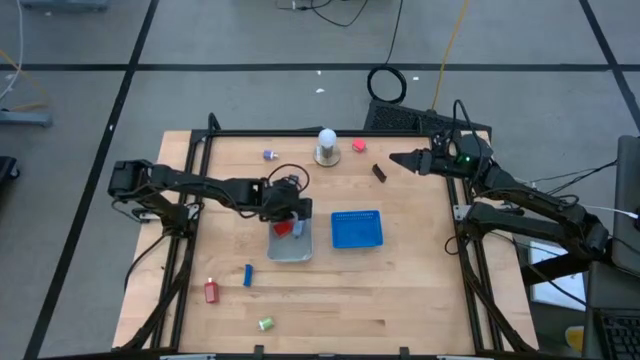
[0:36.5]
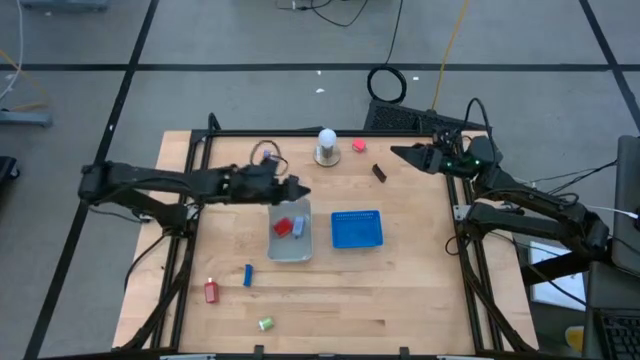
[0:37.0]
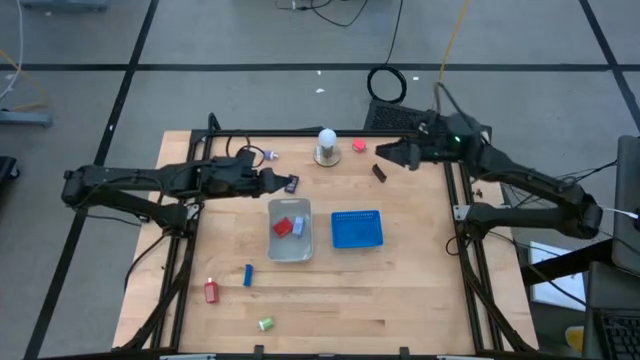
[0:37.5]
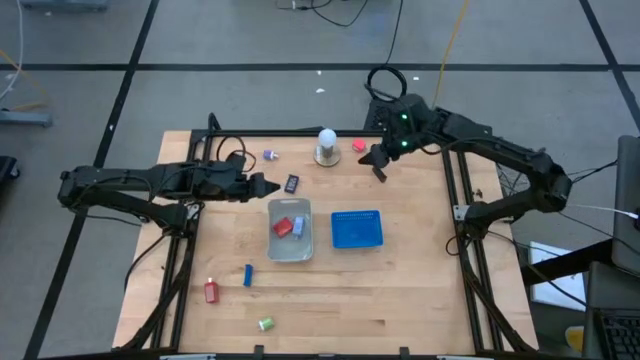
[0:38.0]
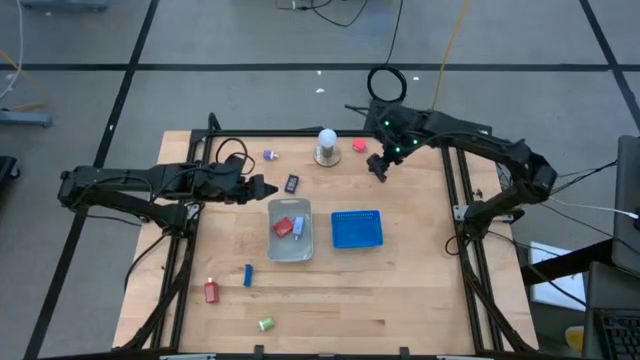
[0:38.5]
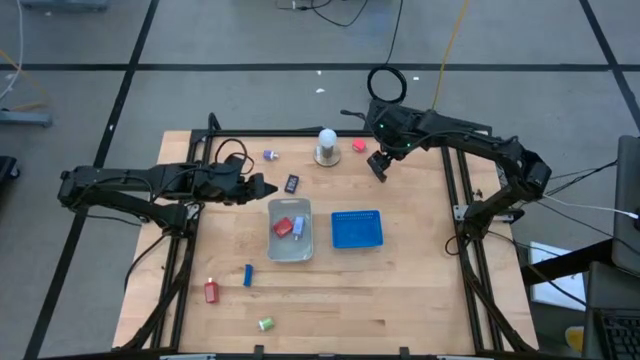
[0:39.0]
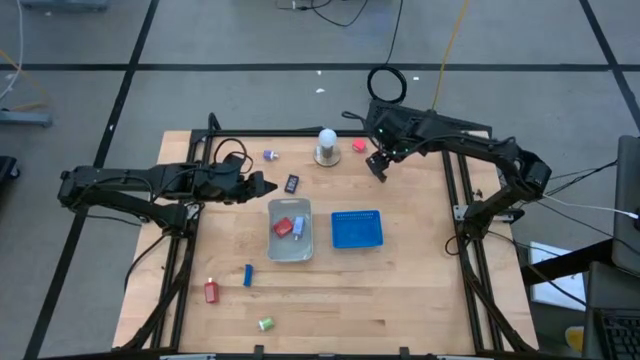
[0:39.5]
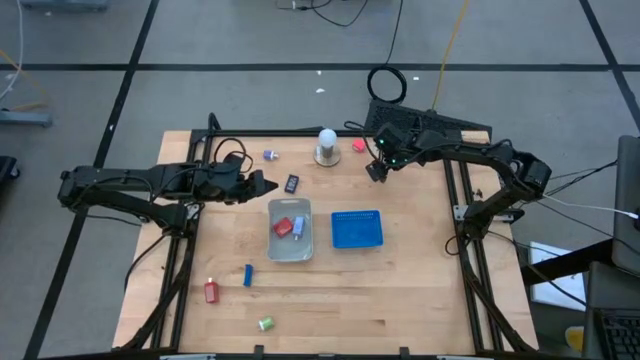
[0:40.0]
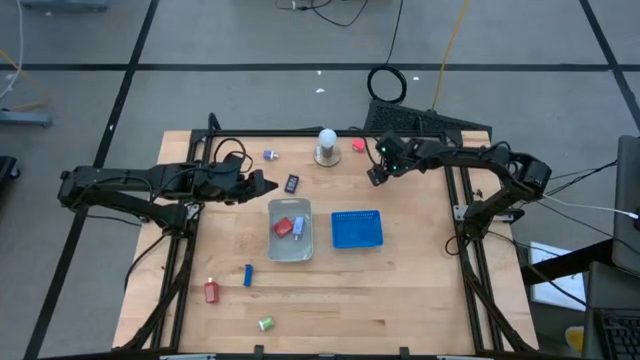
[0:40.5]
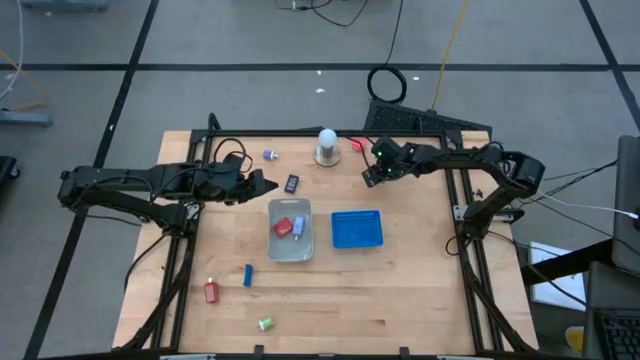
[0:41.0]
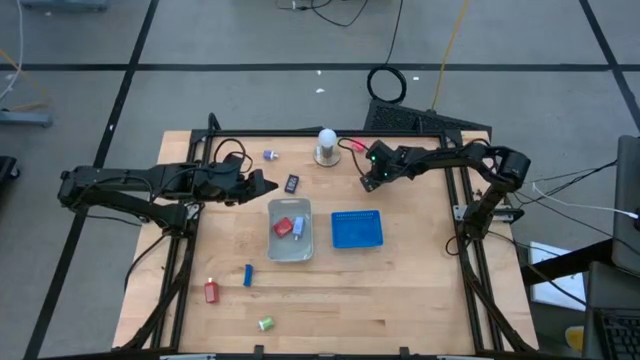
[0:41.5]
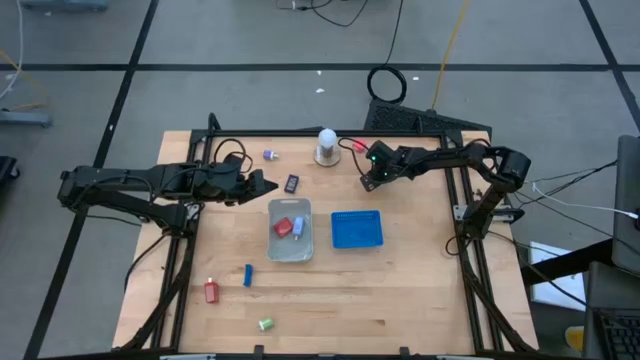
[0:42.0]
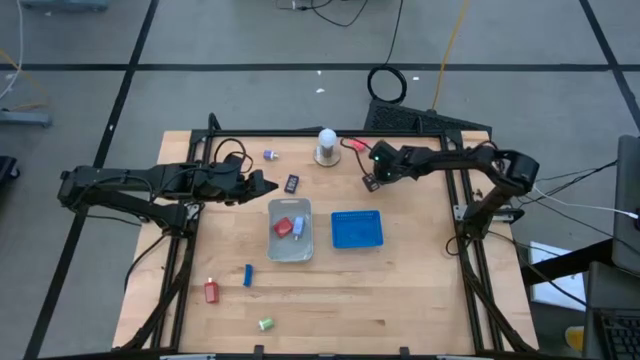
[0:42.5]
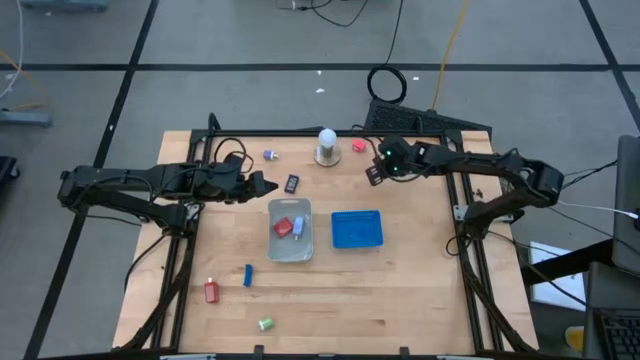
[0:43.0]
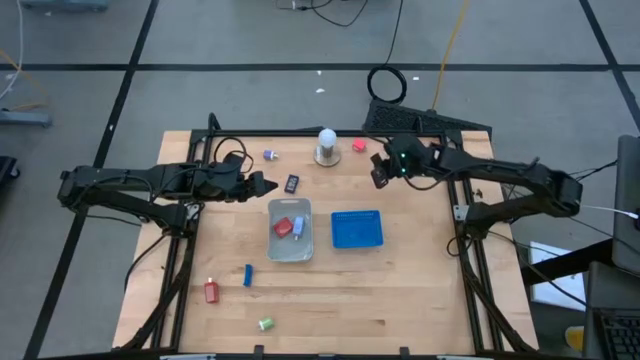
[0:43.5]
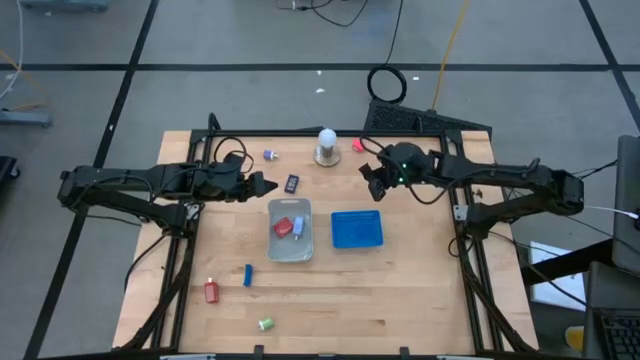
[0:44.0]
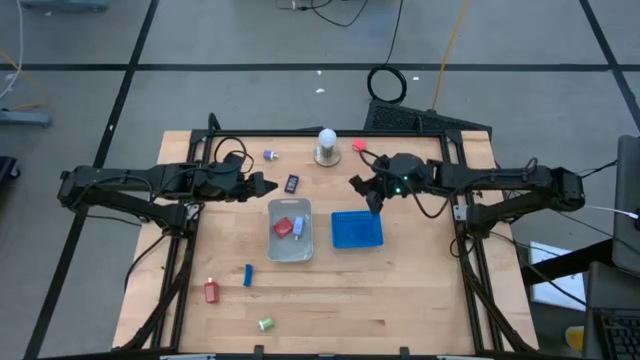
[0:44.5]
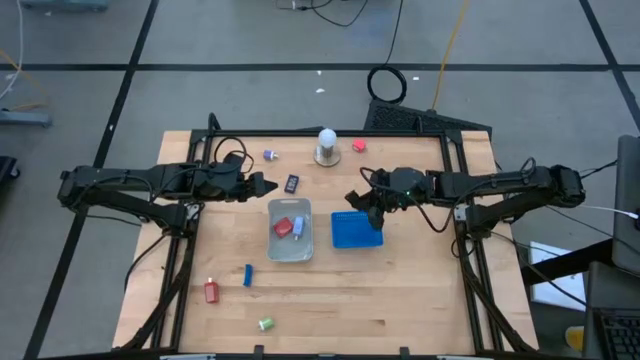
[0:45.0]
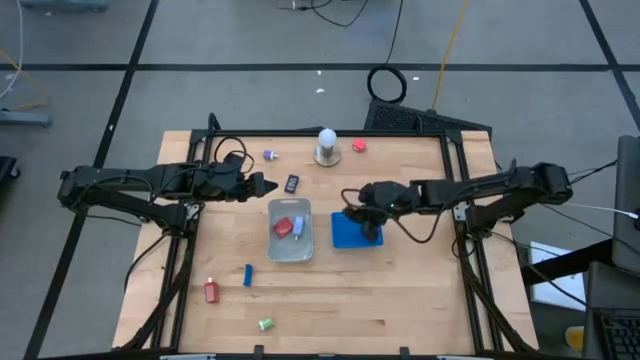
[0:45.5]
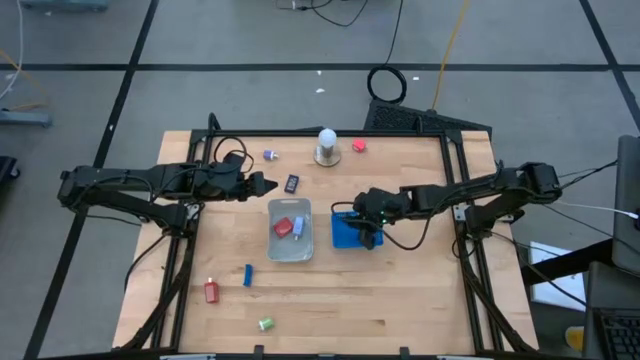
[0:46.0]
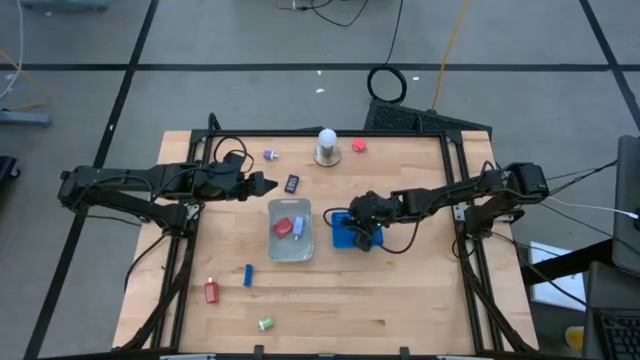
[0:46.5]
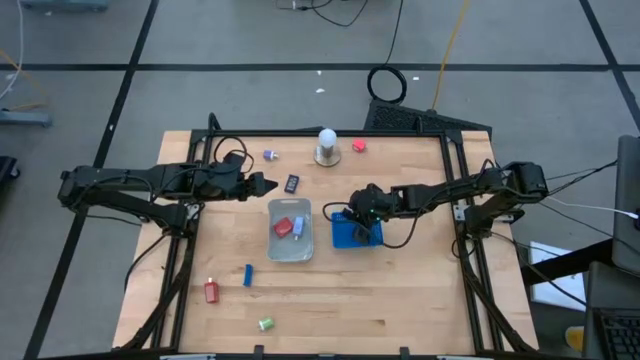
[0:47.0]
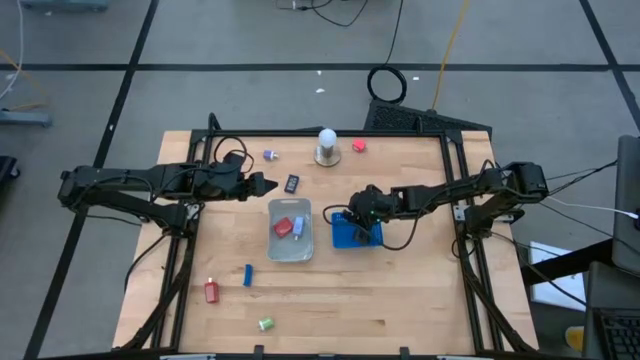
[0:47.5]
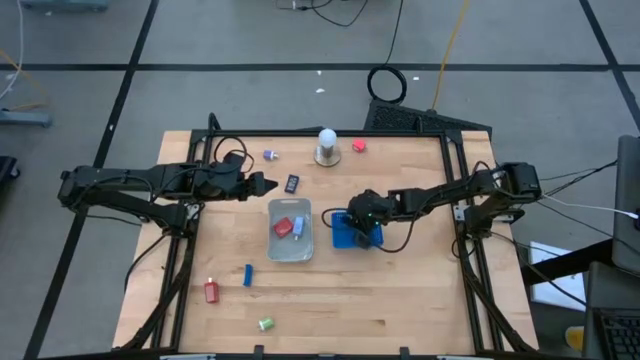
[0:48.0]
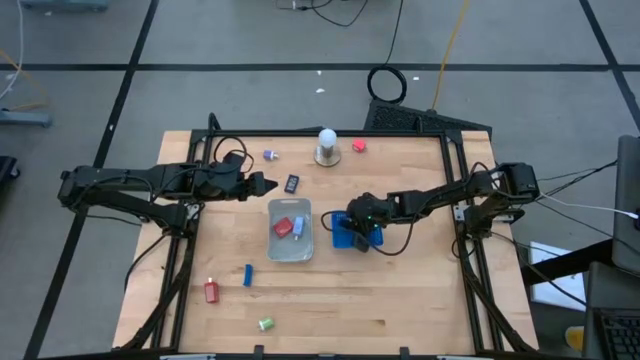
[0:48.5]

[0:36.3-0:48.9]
Task: Pick & Place Office items
Put the black digital clock into the blue bin

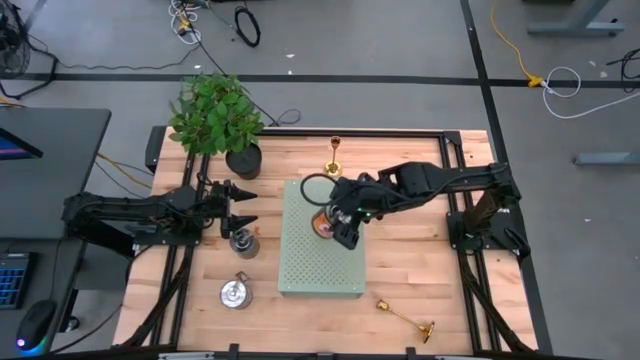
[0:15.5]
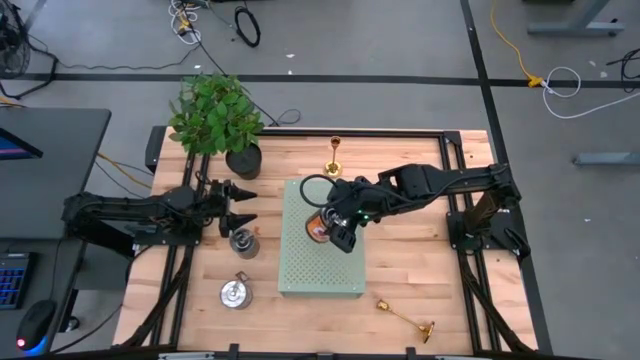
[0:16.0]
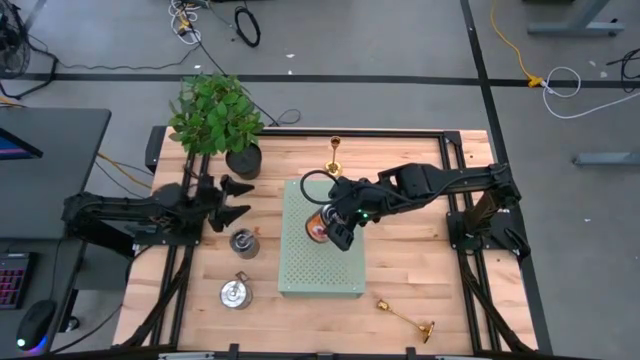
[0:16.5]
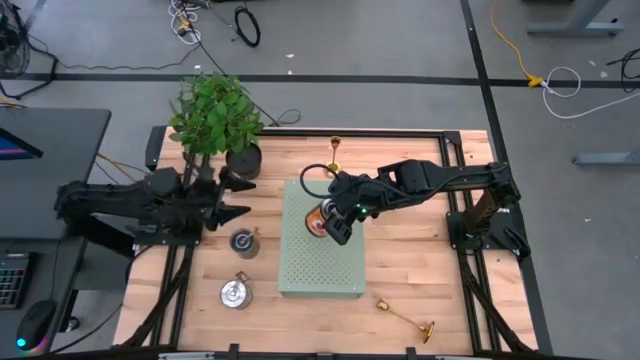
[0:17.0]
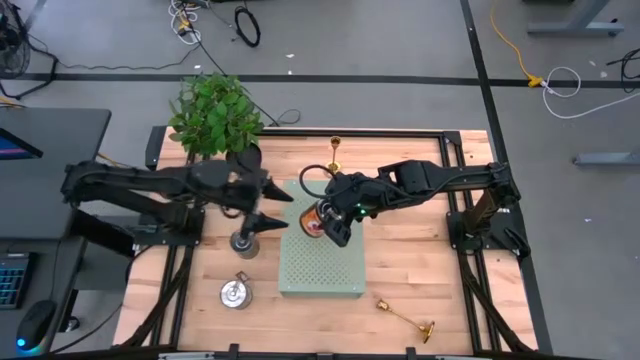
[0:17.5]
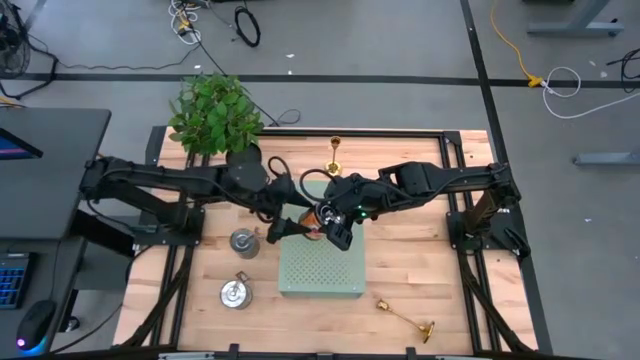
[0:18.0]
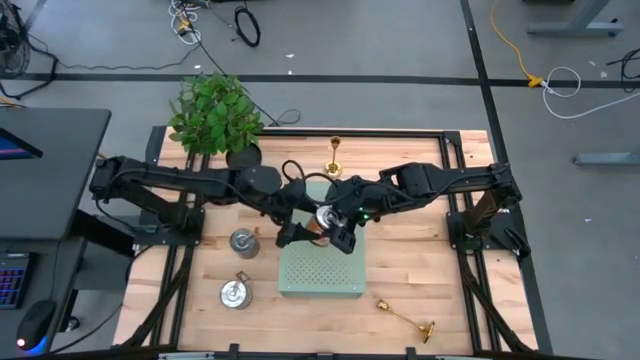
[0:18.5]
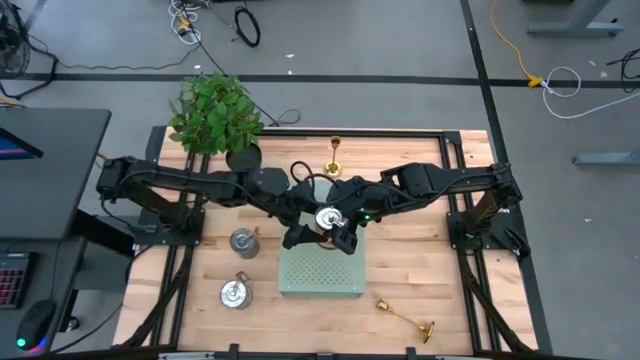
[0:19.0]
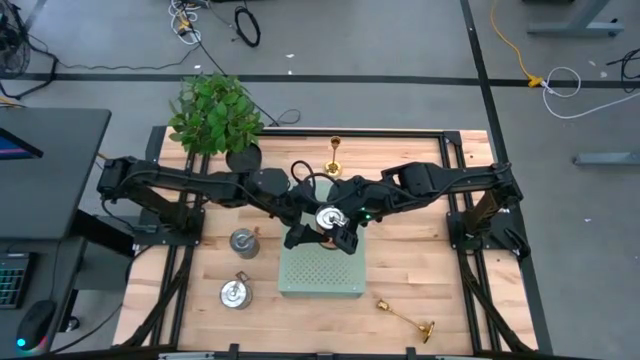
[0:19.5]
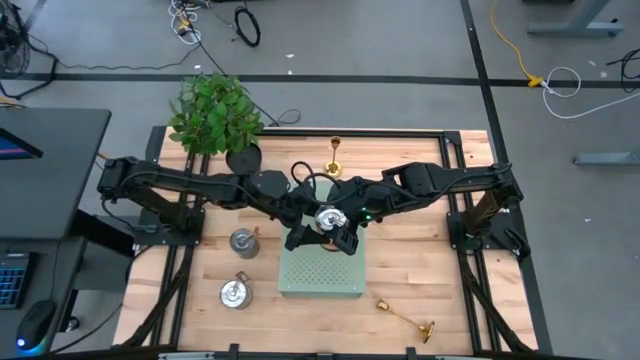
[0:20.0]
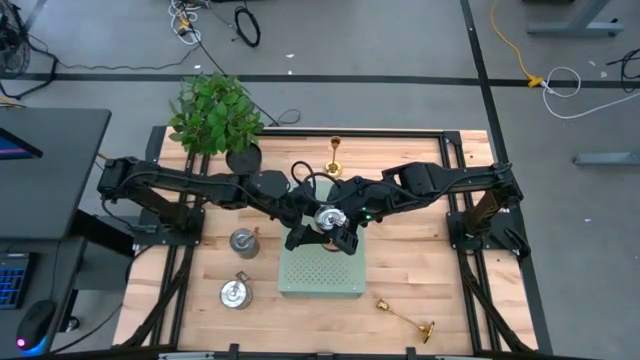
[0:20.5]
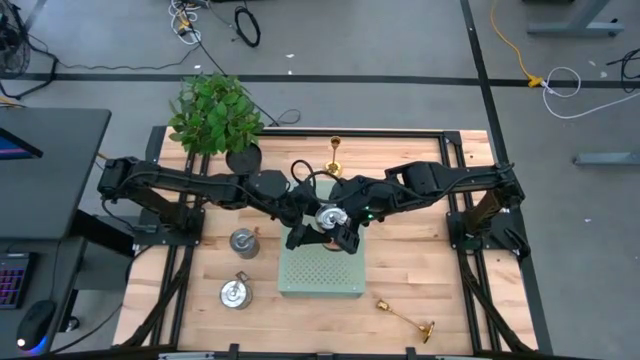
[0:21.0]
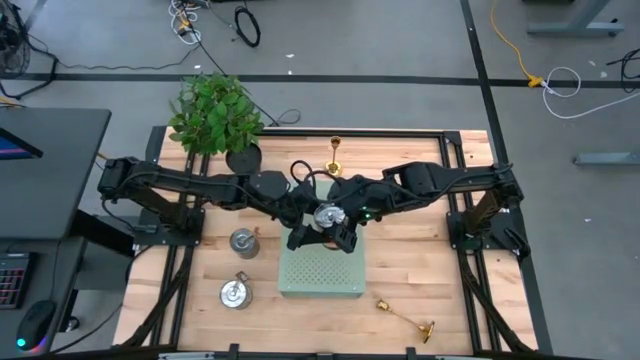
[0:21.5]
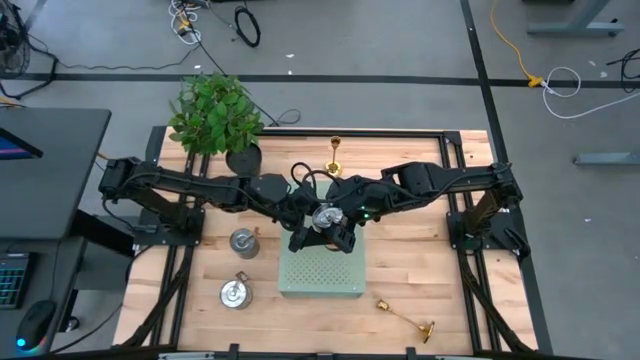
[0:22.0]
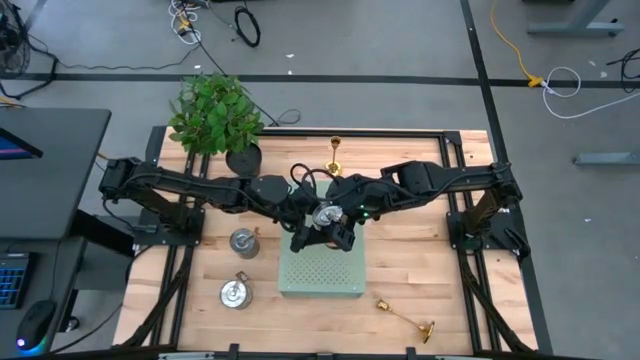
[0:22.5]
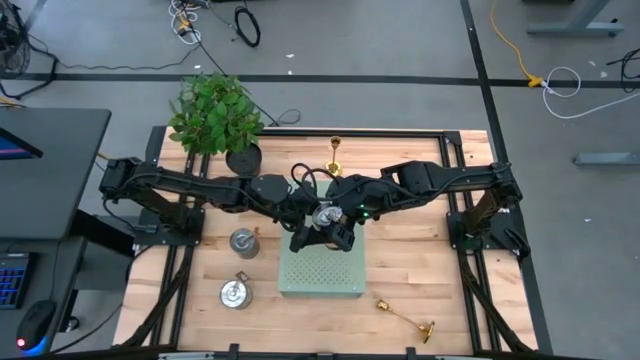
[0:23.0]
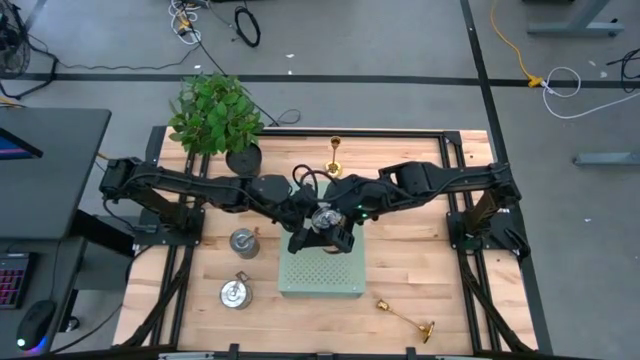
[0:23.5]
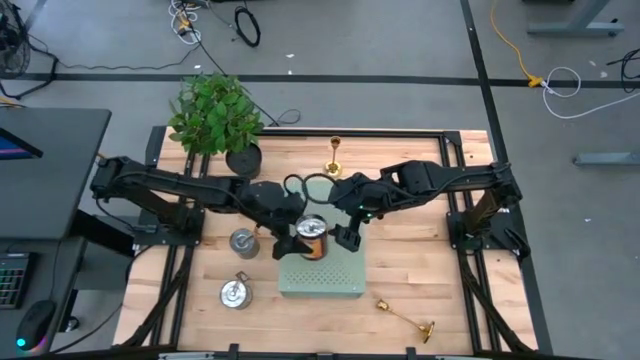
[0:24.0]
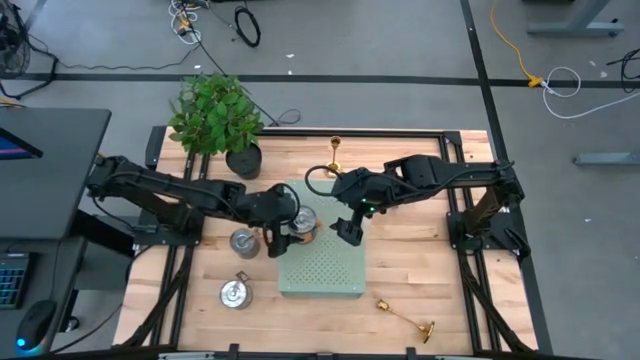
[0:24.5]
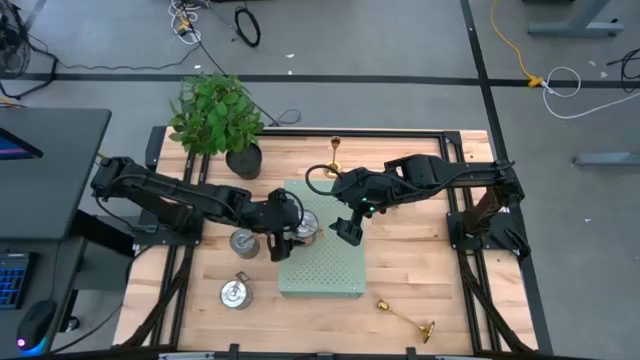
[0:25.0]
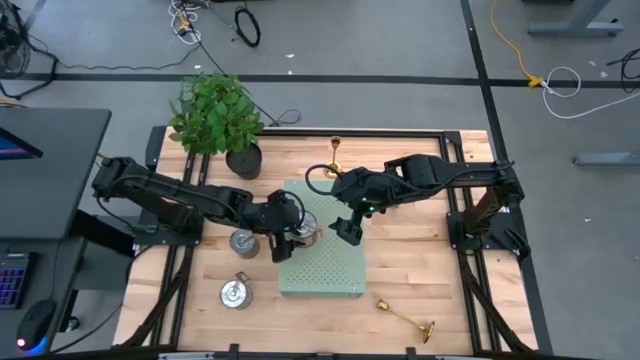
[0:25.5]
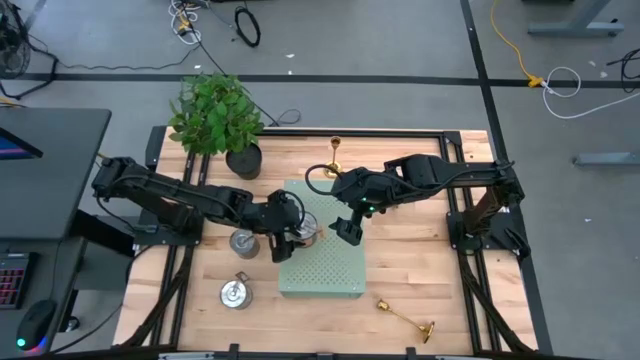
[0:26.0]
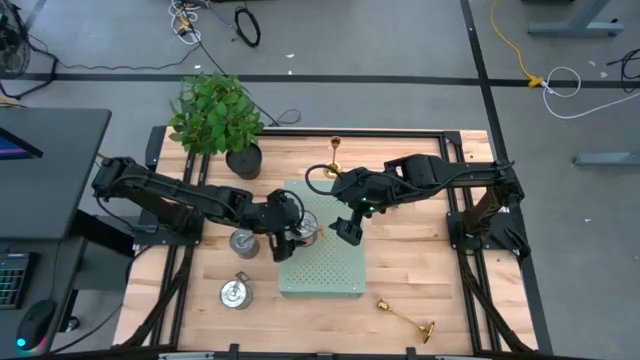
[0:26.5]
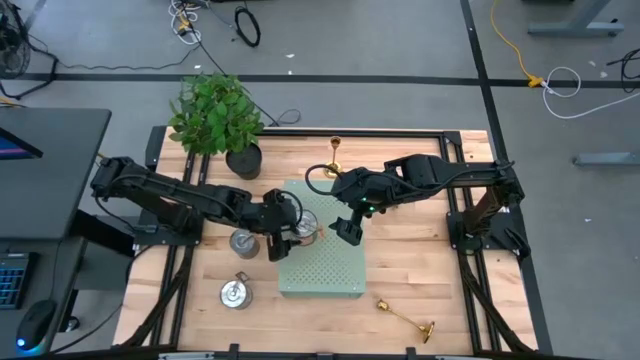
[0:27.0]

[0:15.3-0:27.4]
Task: Pick & Place candle stick holders
Put the top orange scented candle on the shelf
